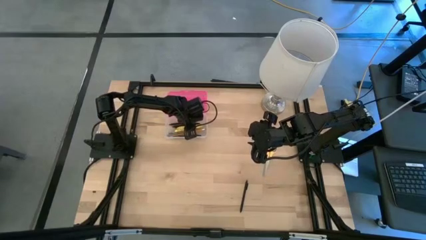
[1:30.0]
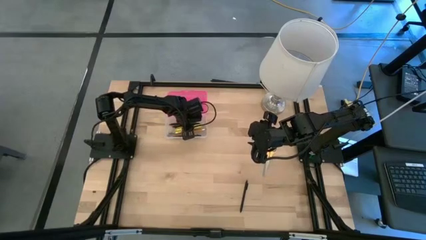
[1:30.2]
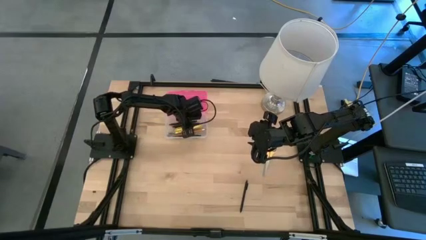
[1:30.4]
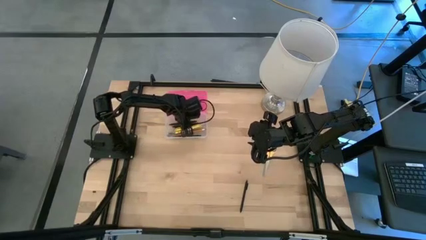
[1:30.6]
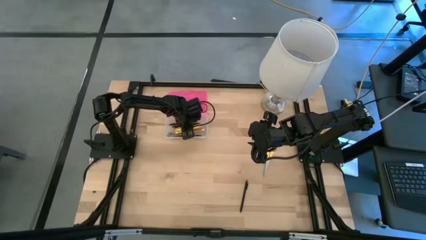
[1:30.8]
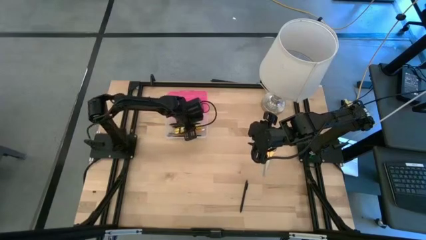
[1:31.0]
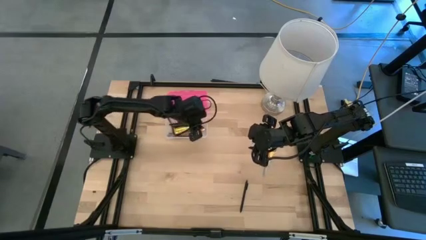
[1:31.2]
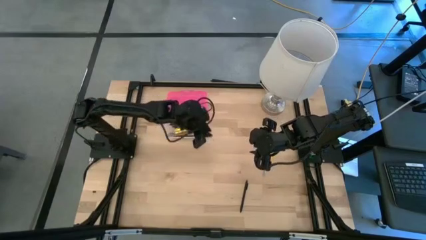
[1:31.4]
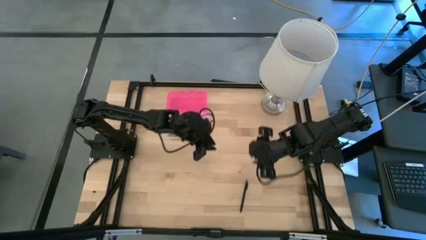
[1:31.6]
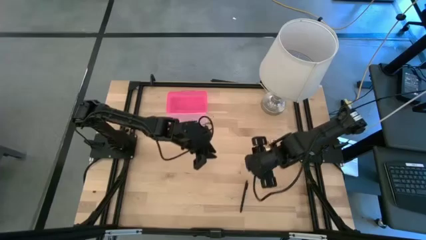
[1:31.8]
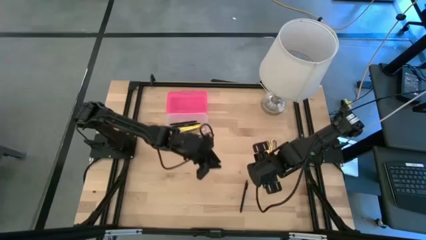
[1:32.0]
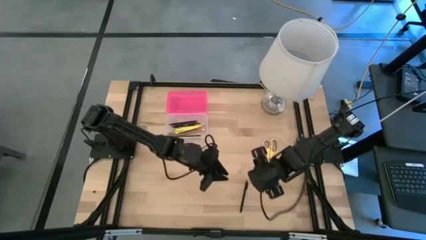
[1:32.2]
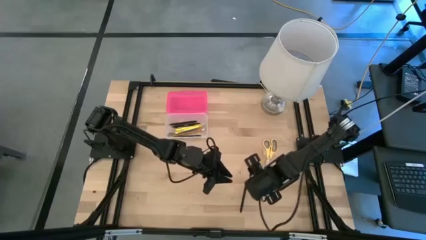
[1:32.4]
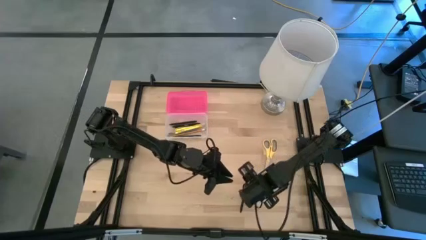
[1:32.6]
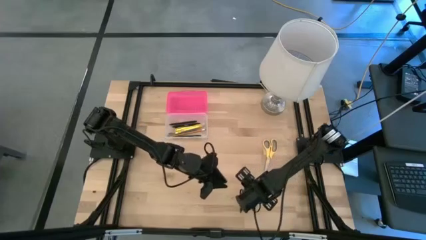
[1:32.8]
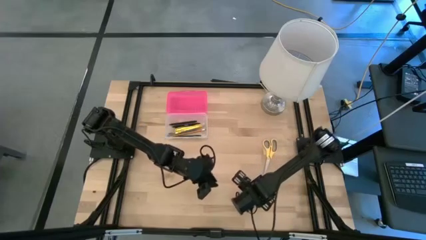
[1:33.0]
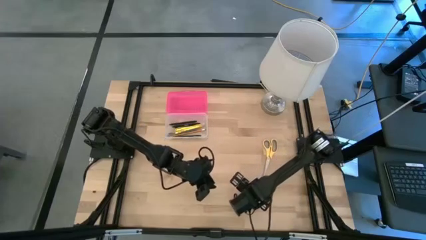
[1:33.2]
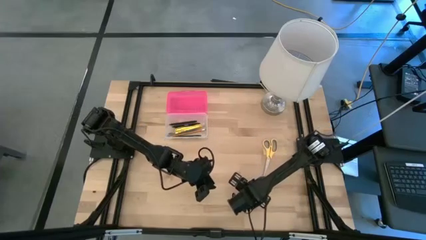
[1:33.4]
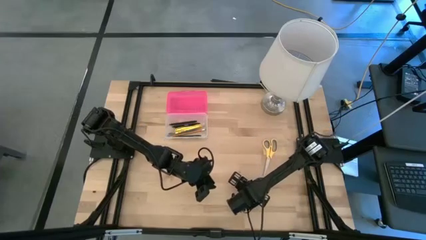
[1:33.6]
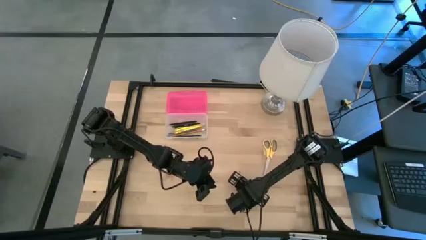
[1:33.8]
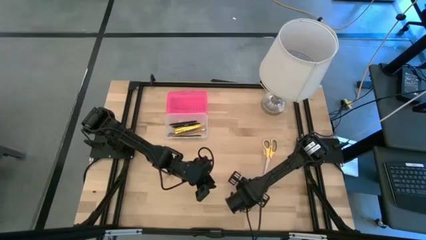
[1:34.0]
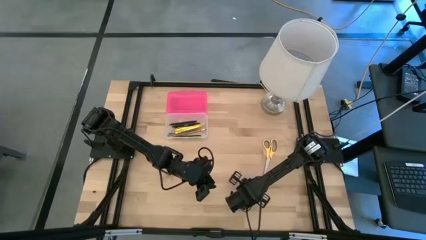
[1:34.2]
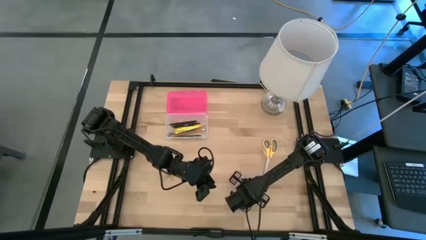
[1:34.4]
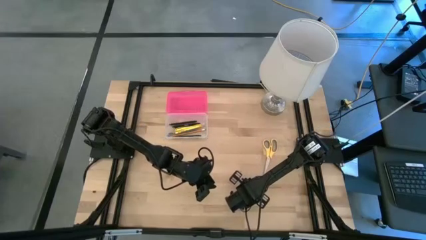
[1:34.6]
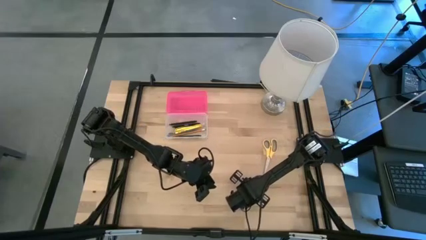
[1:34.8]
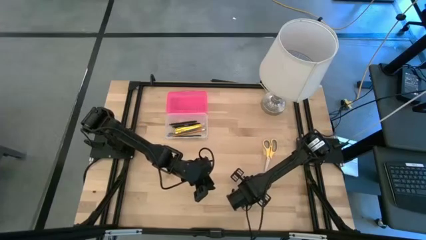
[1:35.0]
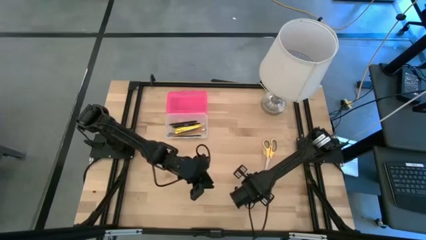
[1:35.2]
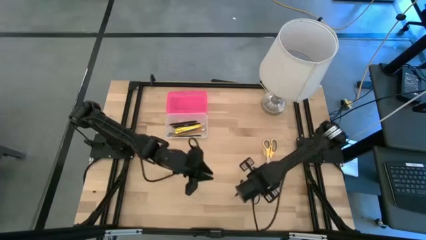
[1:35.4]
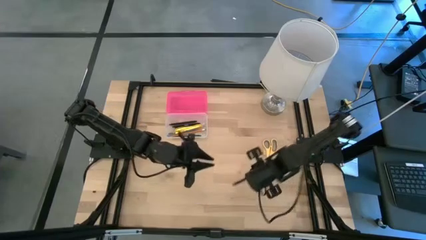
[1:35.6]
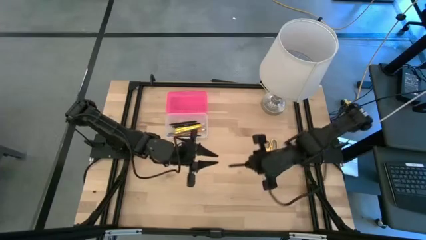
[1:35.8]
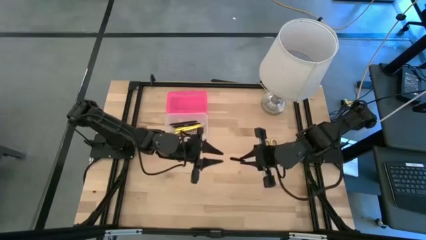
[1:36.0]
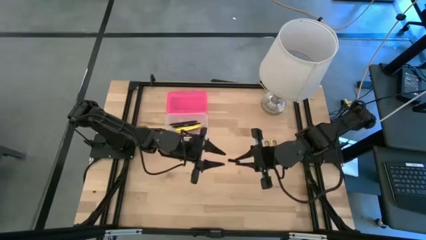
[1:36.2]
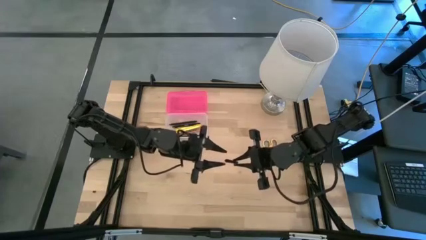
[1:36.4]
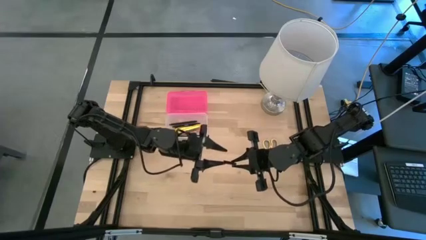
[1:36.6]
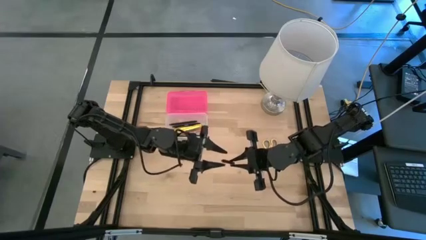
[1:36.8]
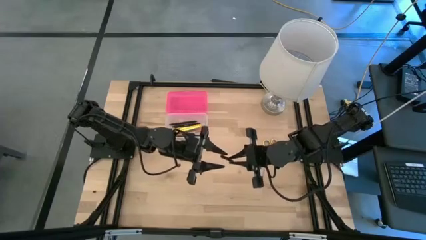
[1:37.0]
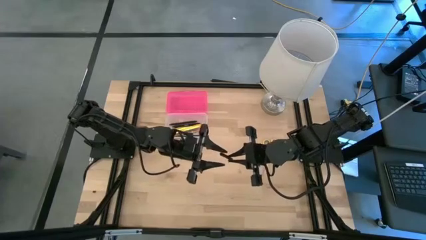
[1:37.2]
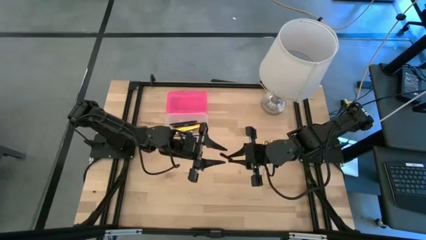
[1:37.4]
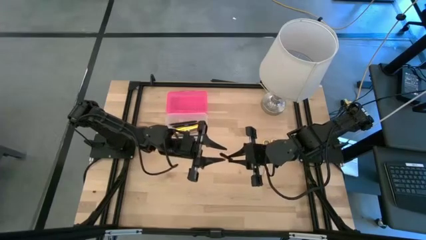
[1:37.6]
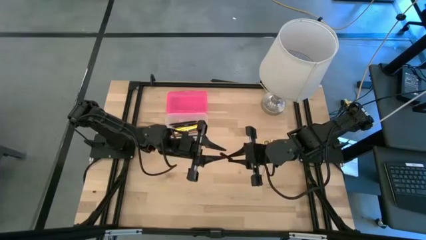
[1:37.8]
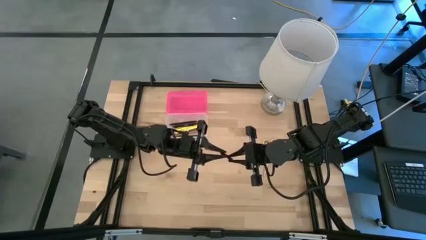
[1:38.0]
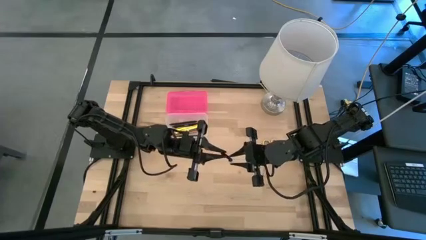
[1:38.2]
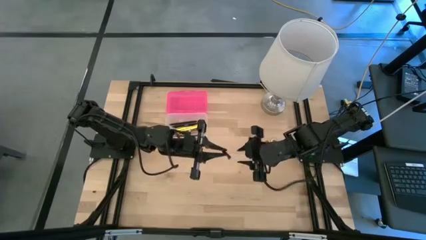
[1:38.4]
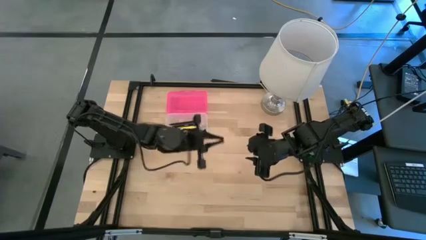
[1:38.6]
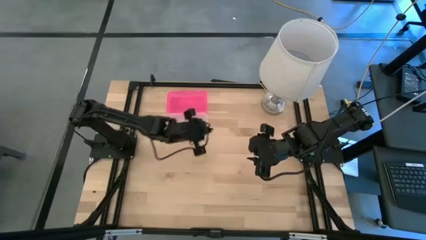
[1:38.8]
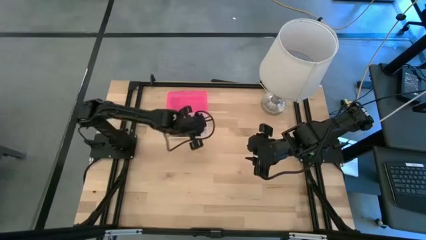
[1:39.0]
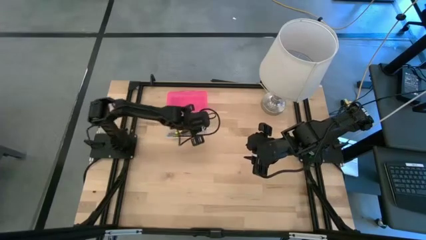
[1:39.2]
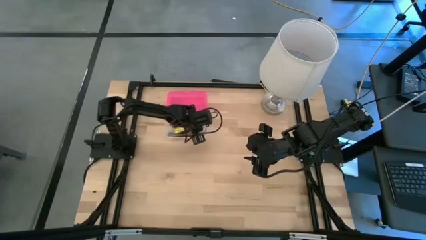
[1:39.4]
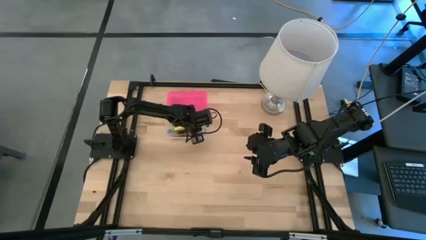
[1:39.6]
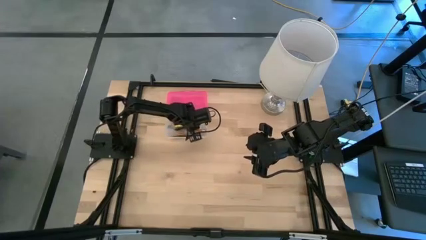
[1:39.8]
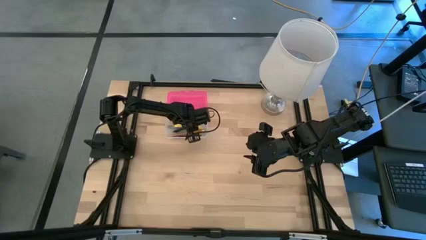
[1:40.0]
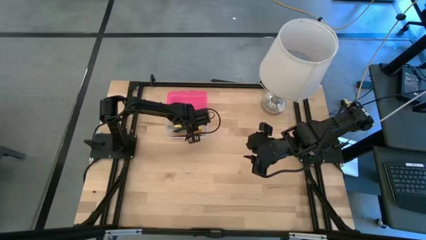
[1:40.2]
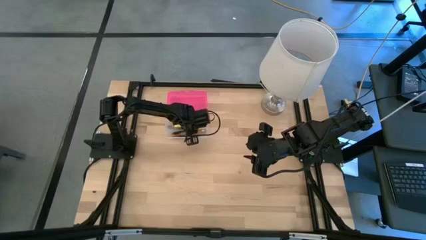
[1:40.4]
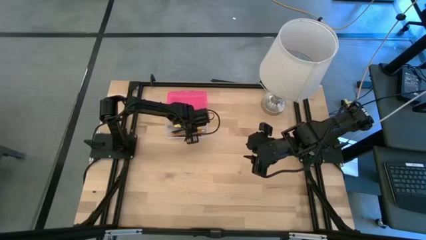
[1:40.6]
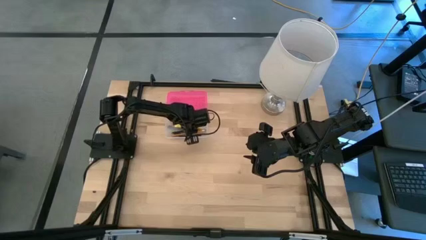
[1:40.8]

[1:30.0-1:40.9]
Task: Pick & place school supplies into a supply box
Put the black pen into the pink supply box

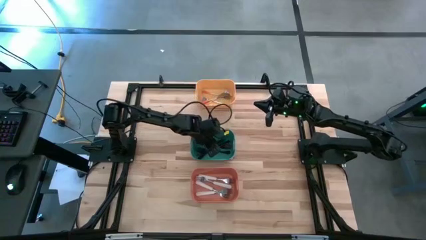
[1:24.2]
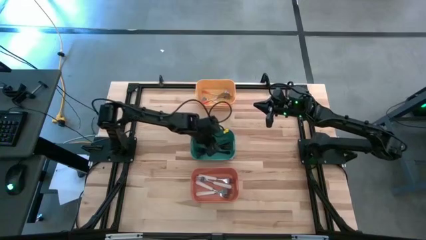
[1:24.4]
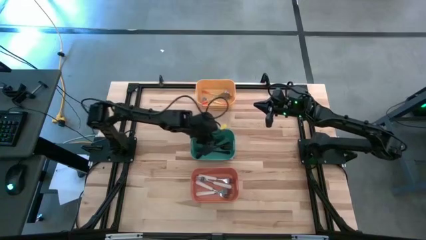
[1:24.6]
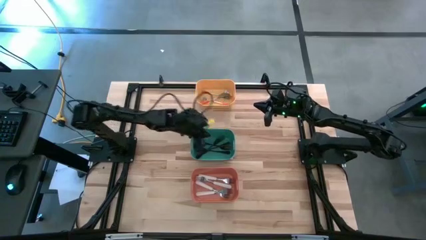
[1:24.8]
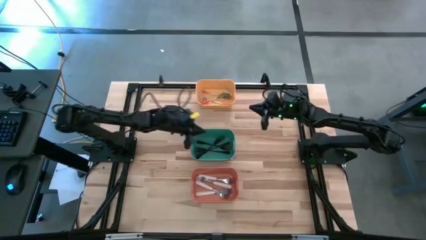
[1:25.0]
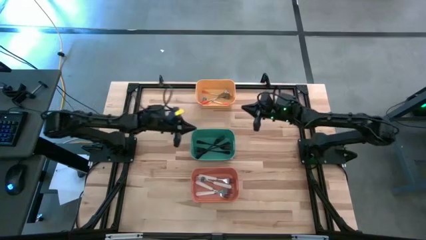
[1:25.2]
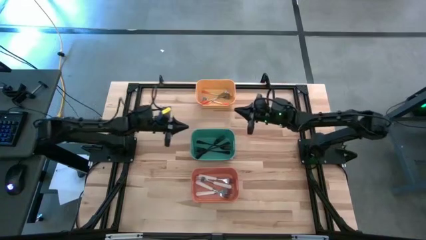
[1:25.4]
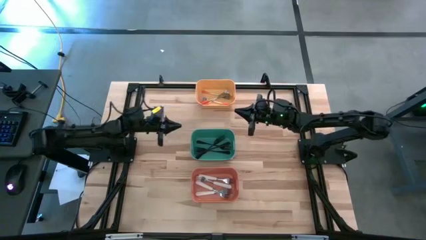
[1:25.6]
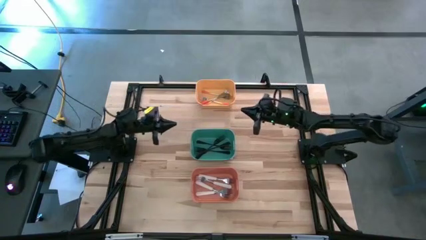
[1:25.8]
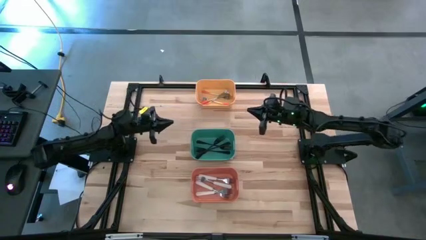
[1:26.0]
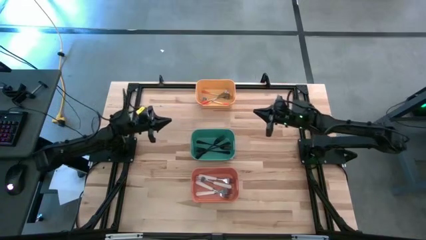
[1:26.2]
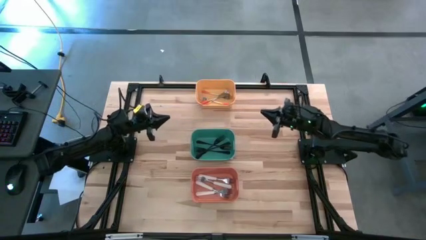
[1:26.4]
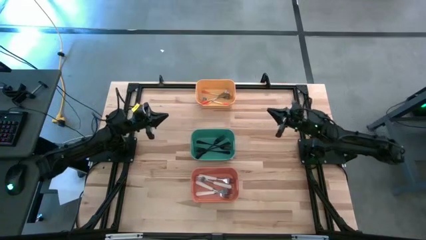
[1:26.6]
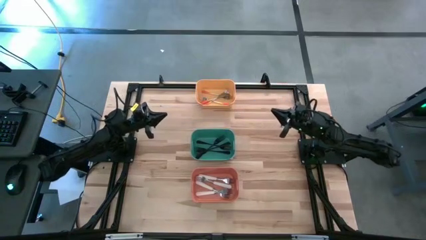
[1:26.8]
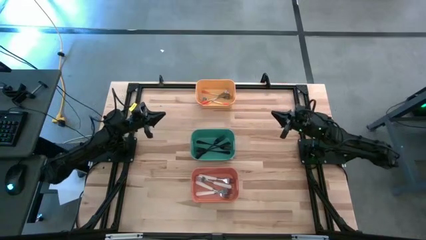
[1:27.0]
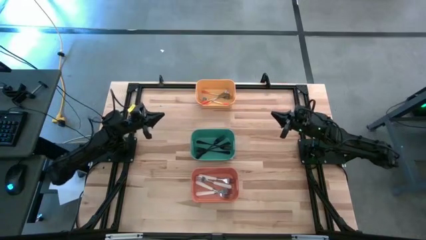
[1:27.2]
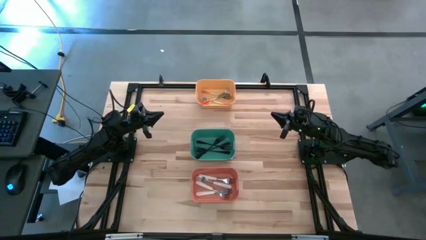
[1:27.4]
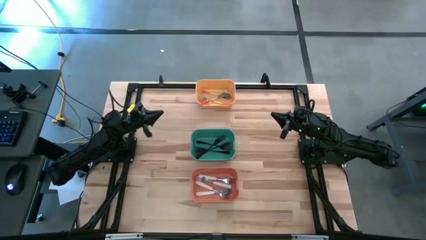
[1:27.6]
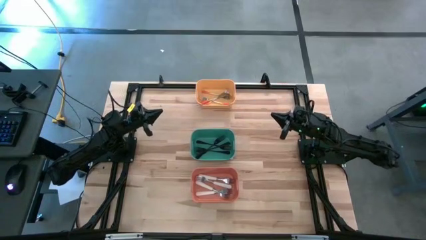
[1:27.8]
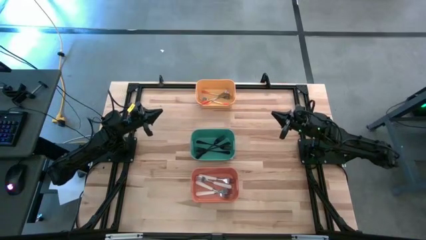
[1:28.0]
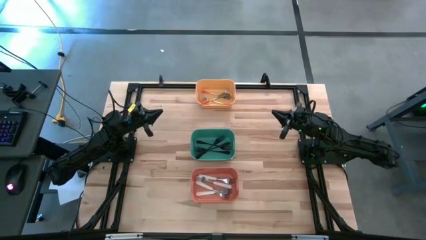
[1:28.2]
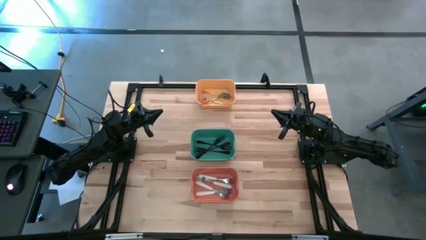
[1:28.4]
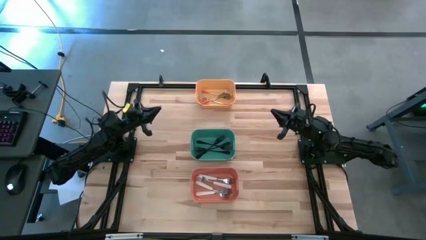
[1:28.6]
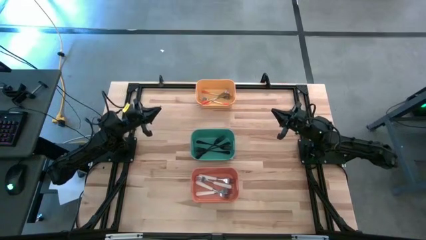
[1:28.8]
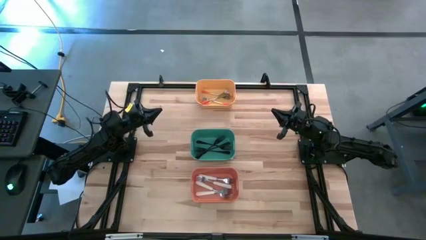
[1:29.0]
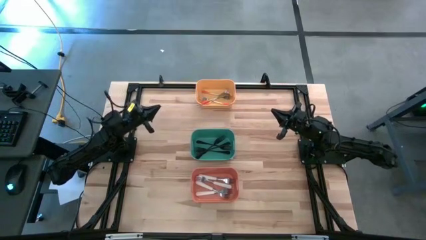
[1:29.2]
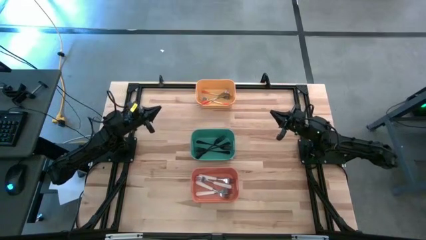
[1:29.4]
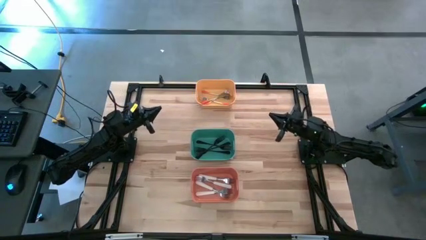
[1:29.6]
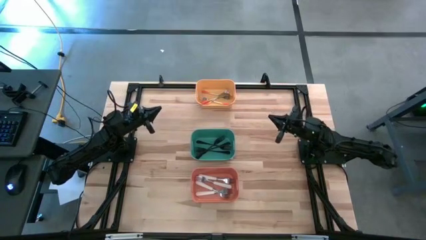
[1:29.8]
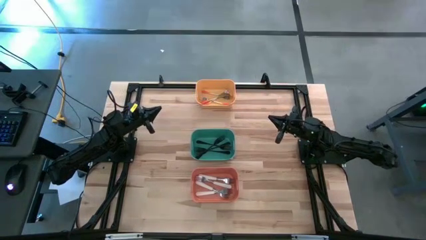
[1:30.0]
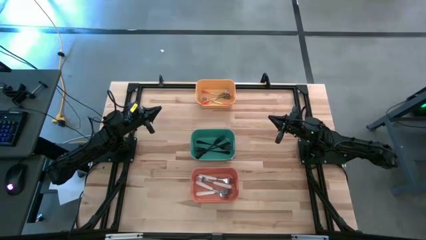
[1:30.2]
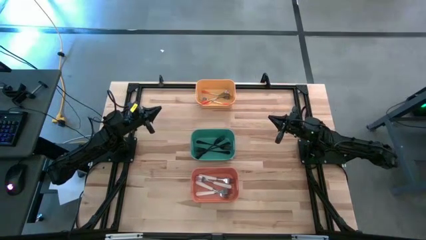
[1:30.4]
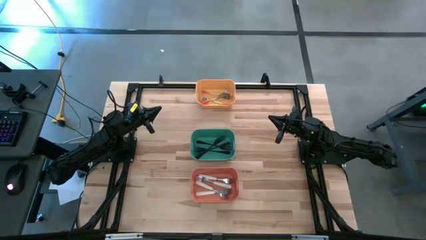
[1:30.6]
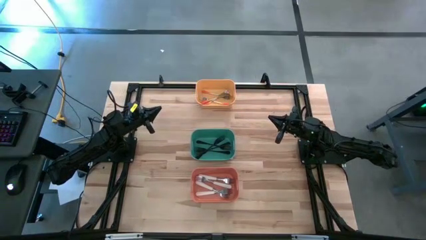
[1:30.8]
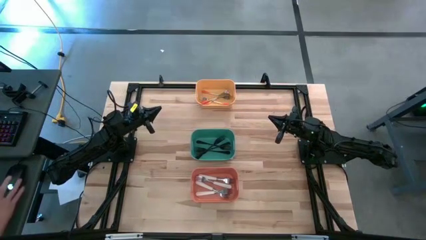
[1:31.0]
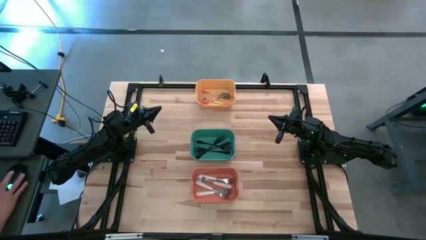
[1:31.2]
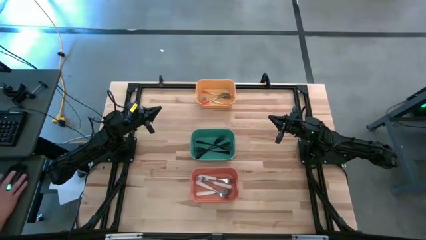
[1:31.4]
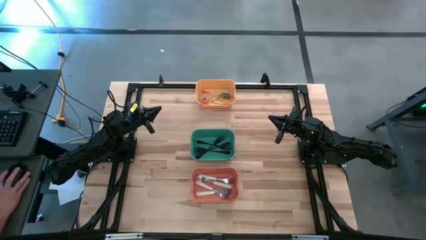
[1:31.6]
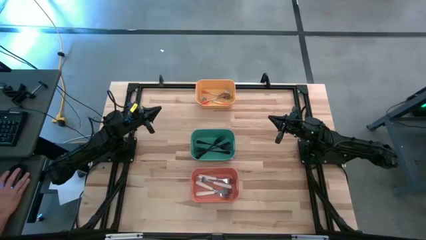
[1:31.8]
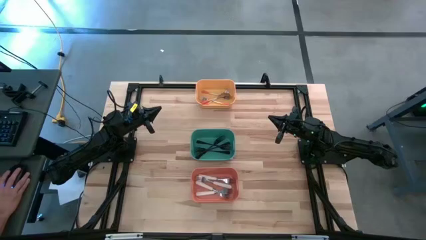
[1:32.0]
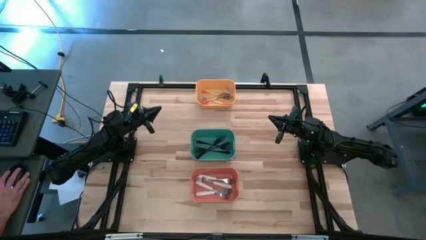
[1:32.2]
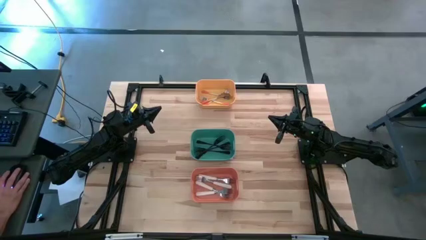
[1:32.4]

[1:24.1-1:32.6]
Task: Sort silverware by color (type)
Return to Home Position
